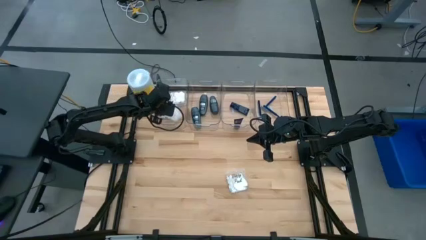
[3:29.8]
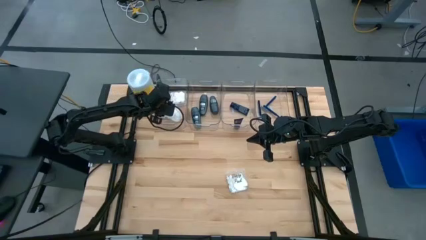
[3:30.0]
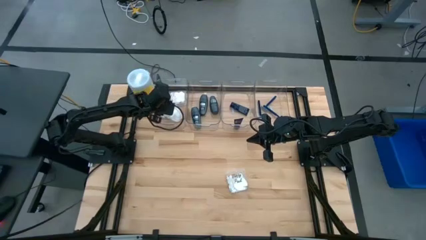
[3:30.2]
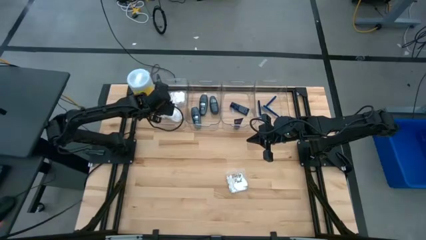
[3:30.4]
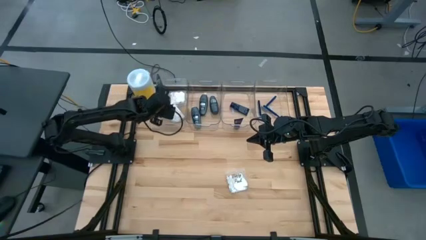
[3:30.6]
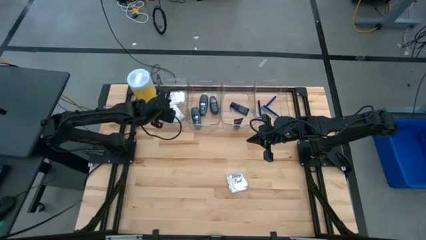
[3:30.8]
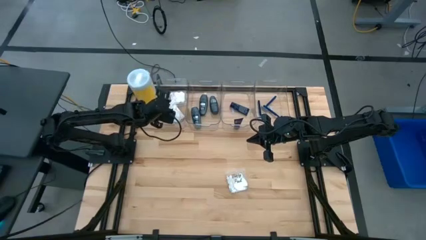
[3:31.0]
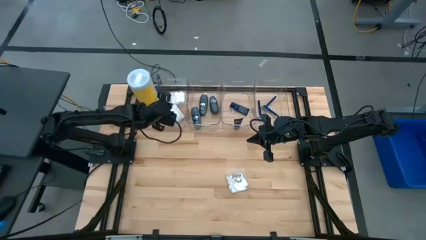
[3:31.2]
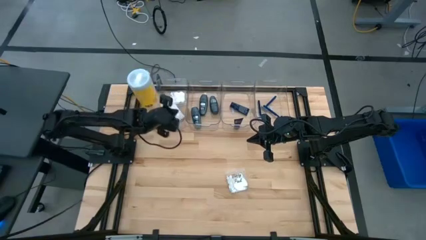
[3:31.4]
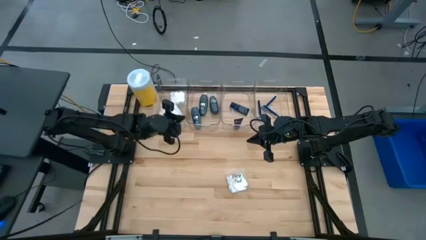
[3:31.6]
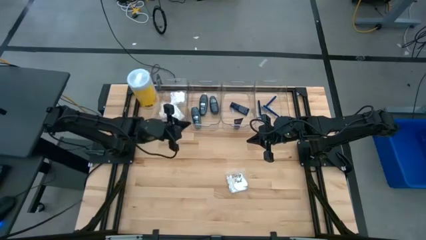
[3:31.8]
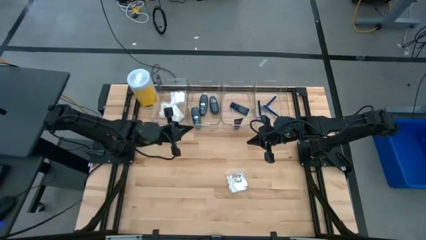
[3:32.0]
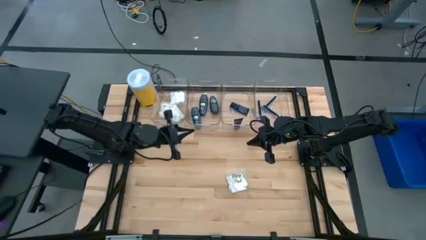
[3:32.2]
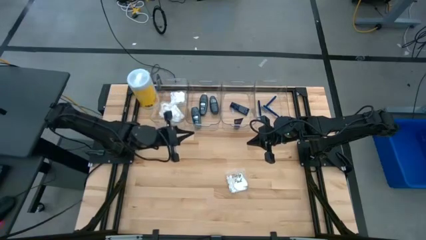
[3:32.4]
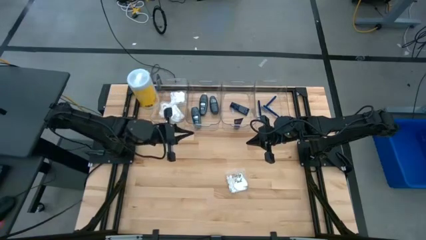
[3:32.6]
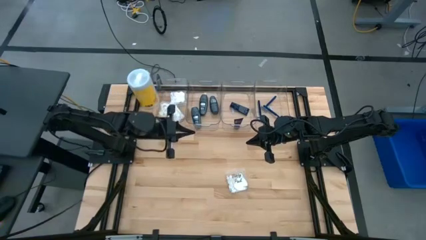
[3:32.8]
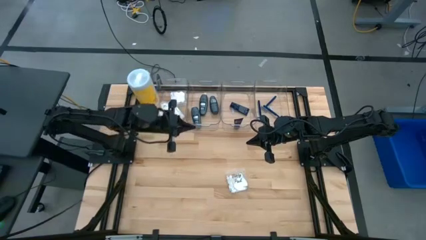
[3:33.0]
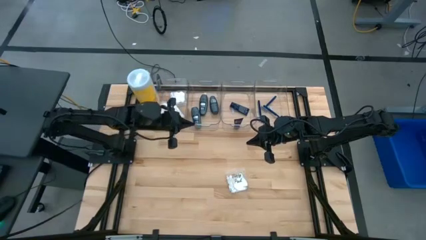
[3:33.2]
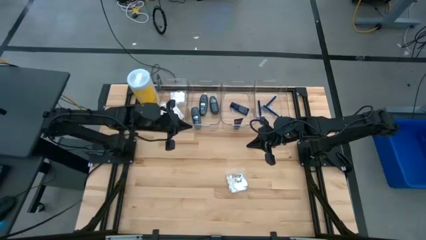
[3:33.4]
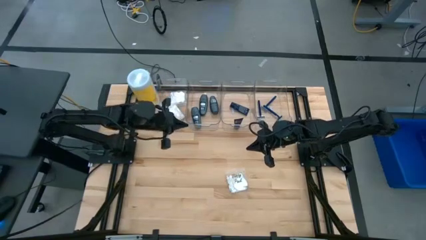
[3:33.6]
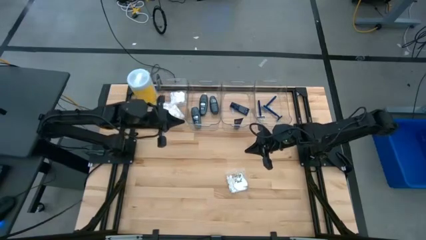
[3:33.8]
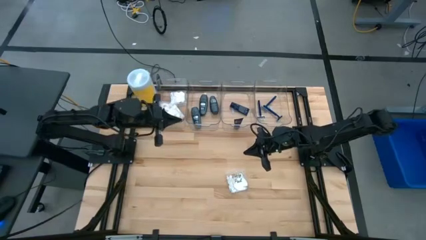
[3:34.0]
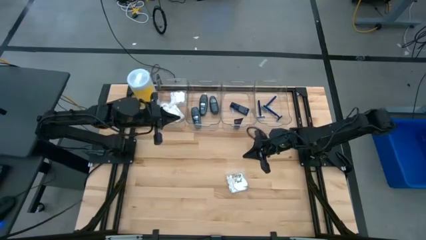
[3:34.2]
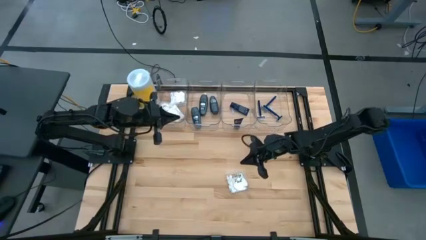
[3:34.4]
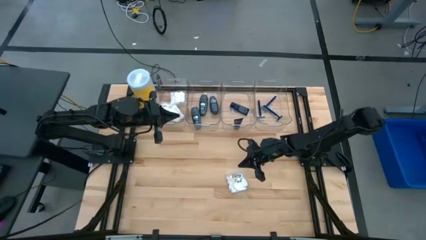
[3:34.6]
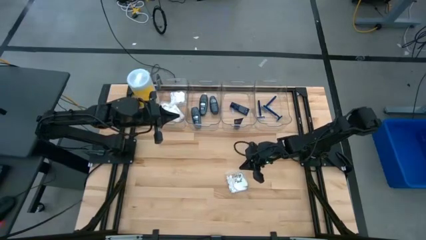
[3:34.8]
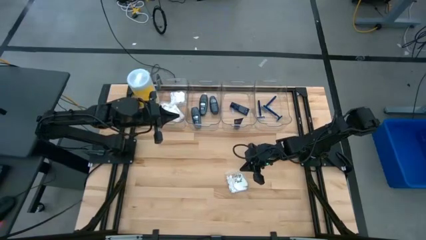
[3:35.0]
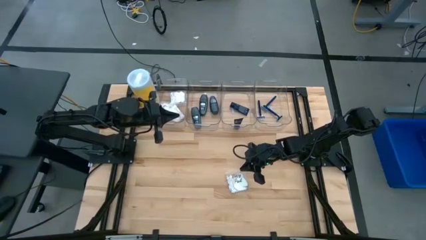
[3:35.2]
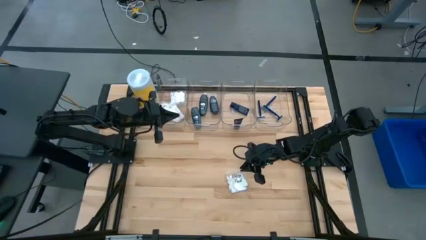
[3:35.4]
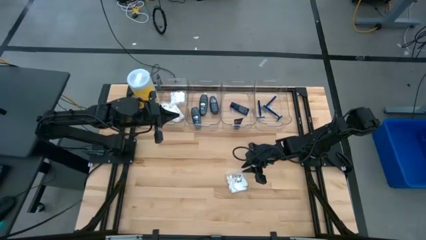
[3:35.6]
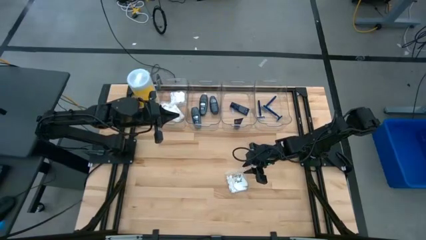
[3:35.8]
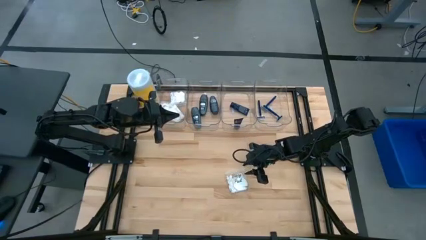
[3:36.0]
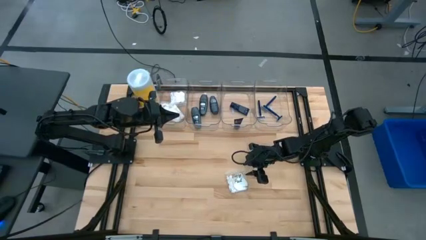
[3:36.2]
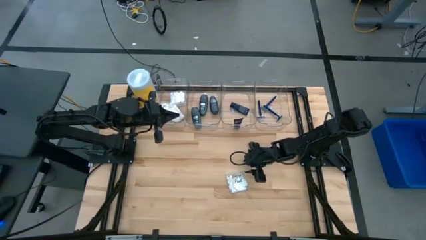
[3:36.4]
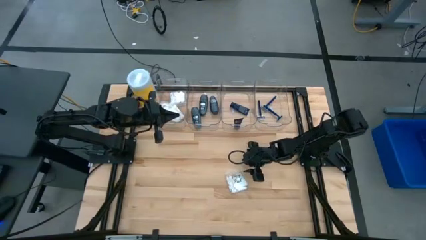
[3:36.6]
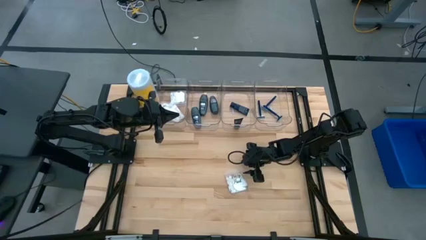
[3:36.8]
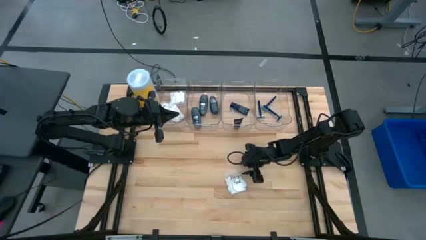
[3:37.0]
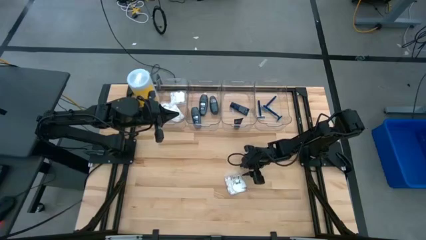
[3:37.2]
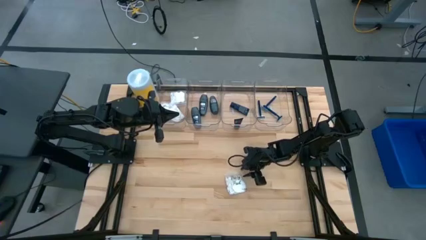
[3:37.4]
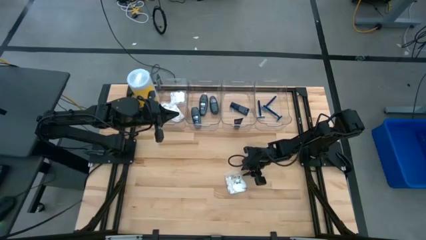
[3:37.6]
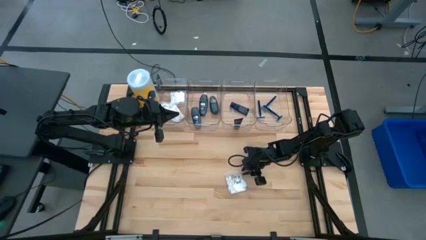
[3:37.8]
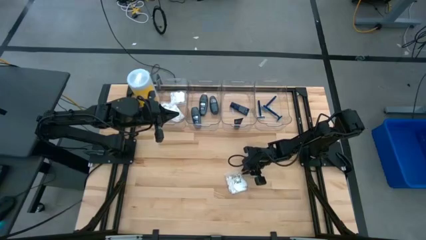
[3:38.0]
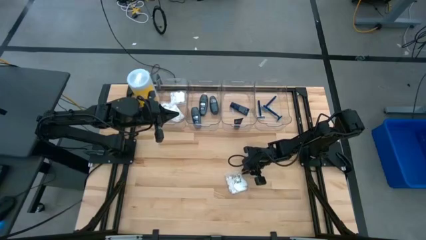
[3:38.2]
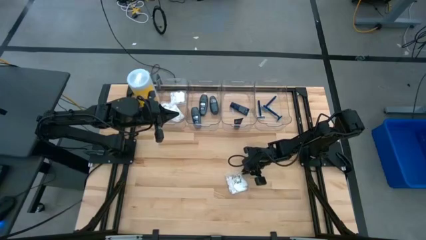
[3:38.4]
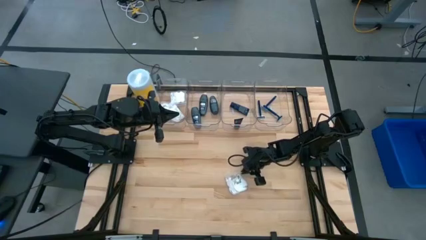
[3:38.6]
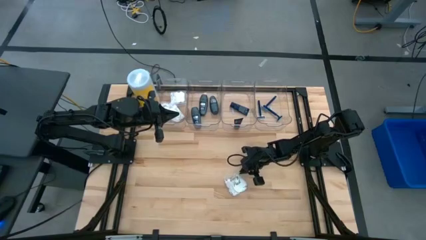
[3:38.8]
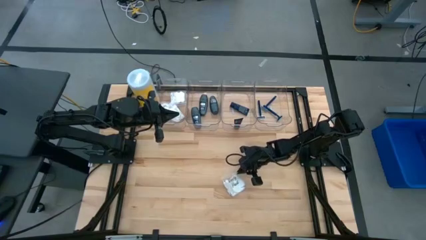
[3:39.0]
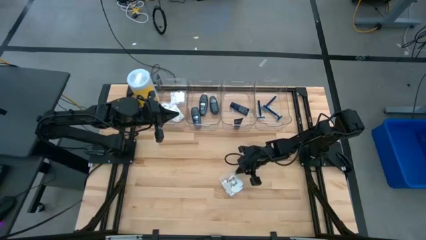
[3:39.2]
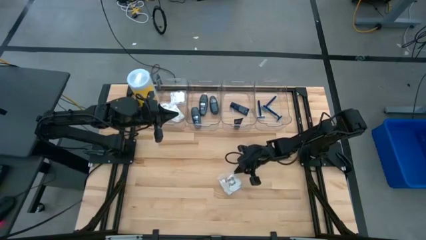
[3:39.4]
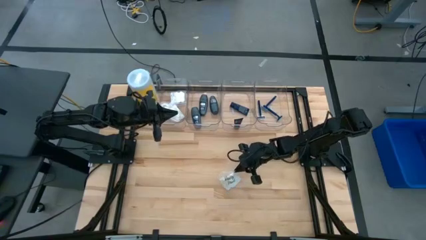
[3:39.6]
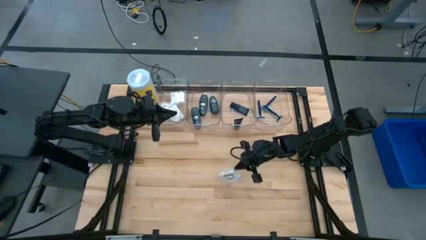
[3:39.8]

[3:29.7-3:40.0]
Task: Pick & Place Travel size toiletries
Put the white cotton pack into the left transparent bin

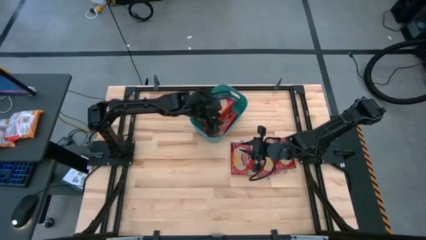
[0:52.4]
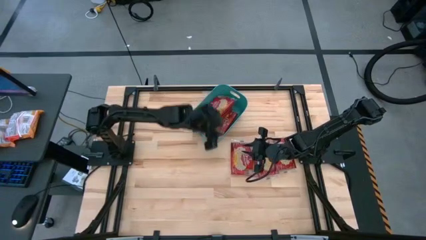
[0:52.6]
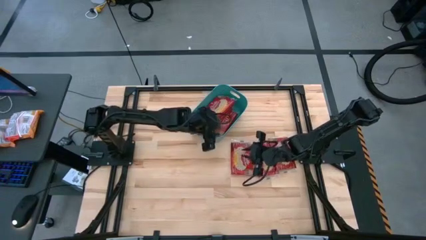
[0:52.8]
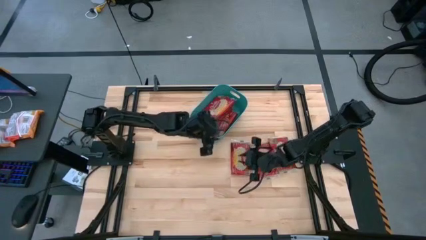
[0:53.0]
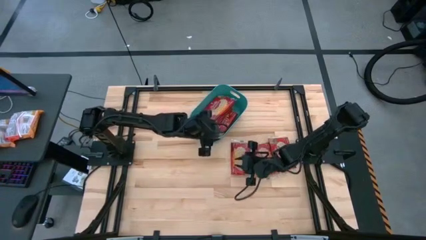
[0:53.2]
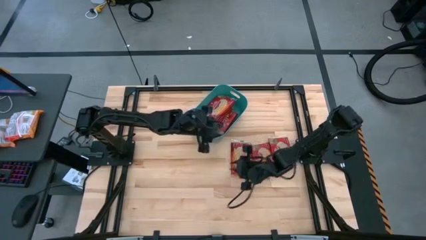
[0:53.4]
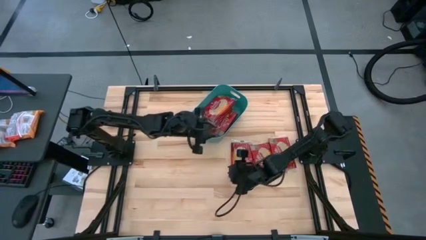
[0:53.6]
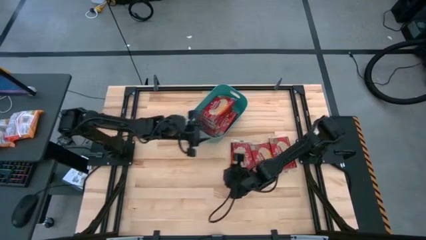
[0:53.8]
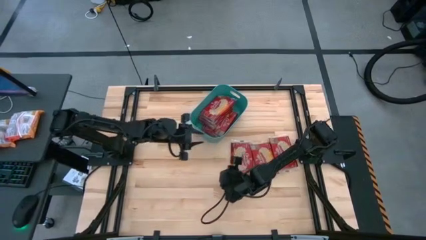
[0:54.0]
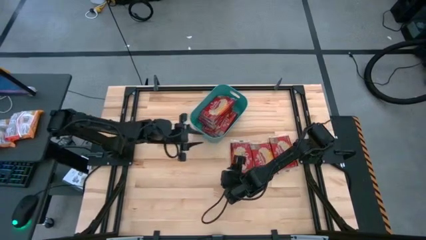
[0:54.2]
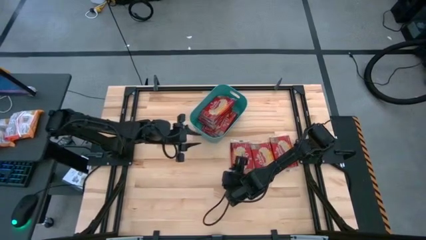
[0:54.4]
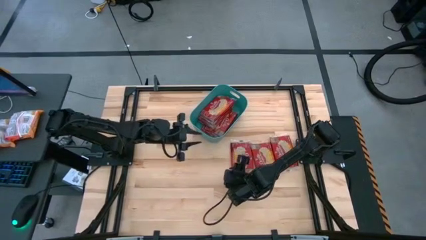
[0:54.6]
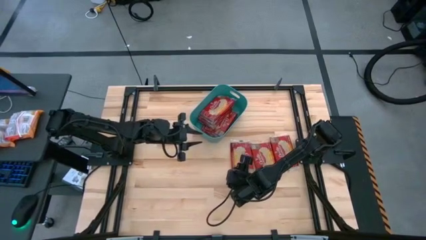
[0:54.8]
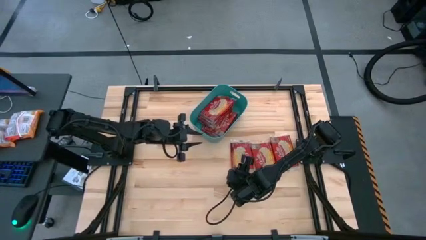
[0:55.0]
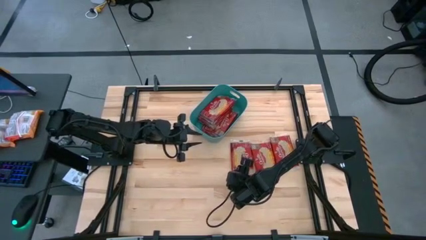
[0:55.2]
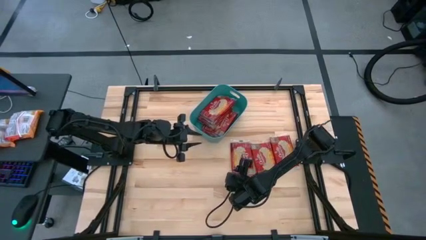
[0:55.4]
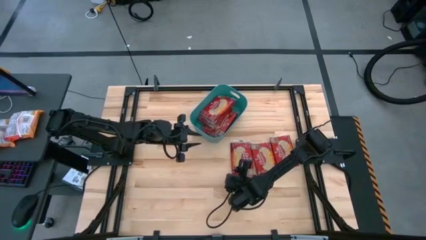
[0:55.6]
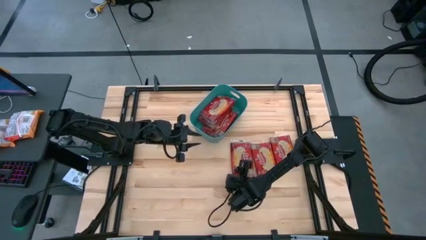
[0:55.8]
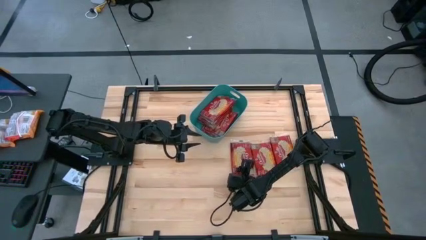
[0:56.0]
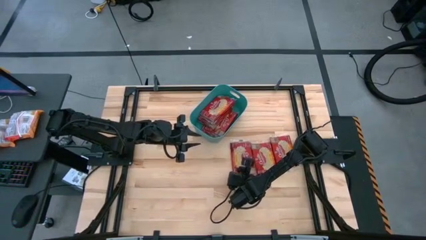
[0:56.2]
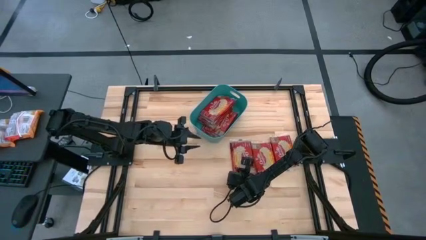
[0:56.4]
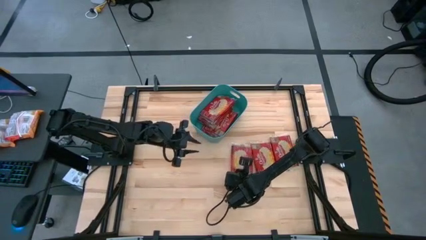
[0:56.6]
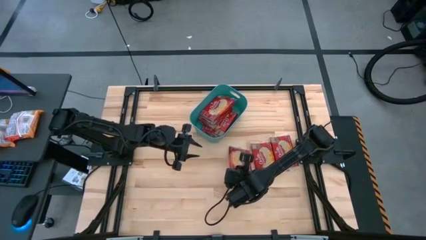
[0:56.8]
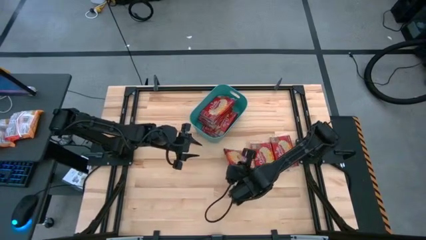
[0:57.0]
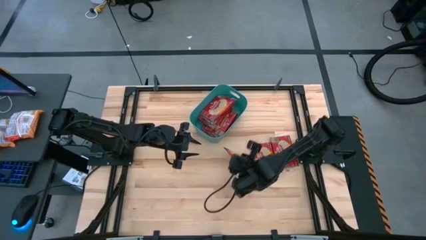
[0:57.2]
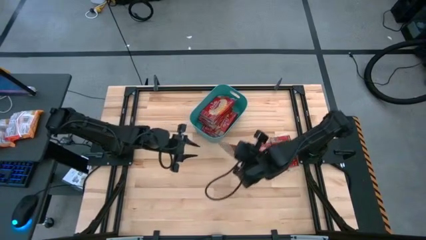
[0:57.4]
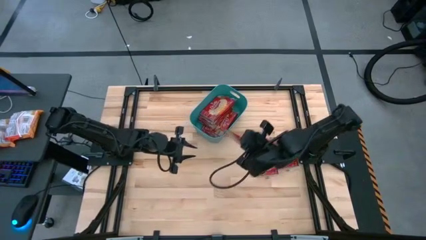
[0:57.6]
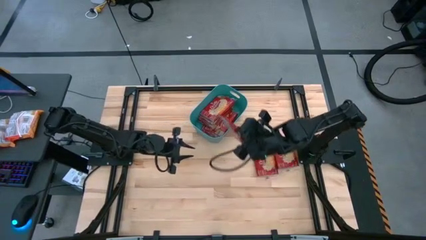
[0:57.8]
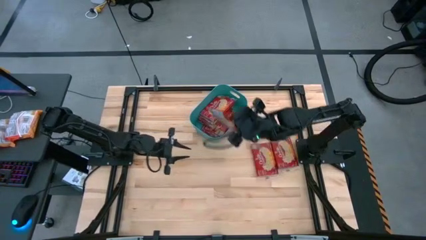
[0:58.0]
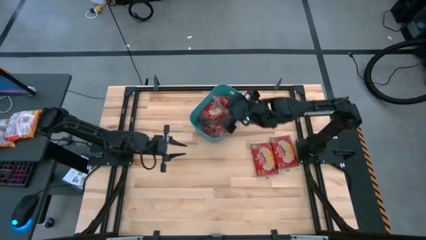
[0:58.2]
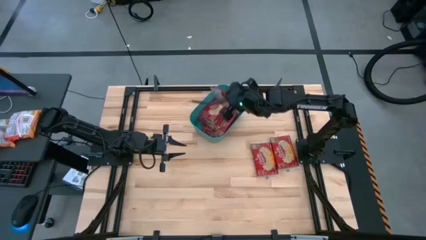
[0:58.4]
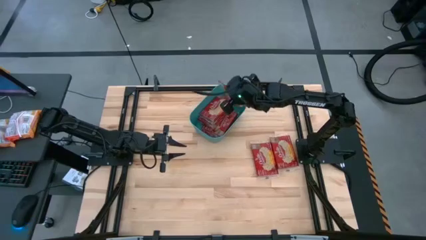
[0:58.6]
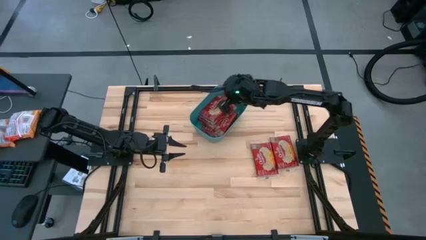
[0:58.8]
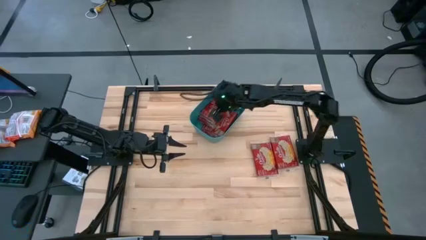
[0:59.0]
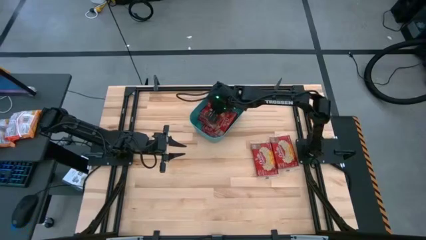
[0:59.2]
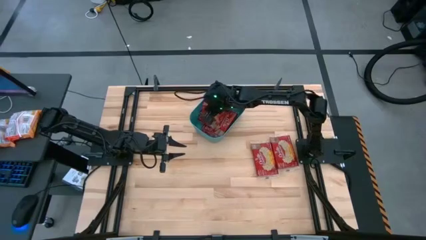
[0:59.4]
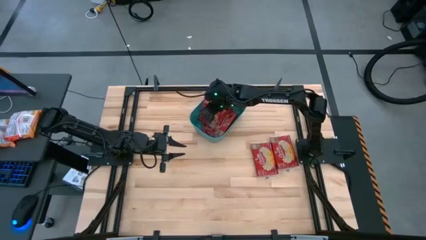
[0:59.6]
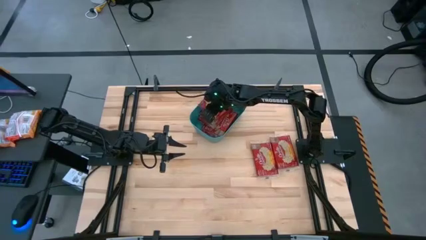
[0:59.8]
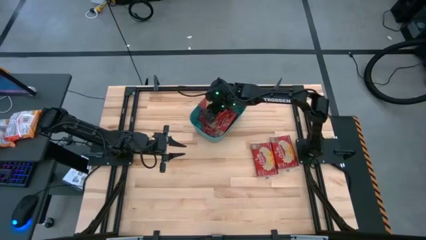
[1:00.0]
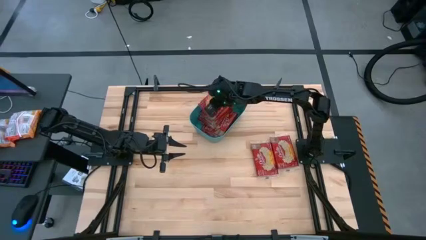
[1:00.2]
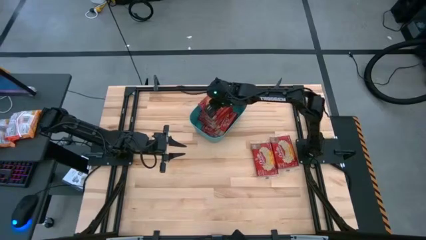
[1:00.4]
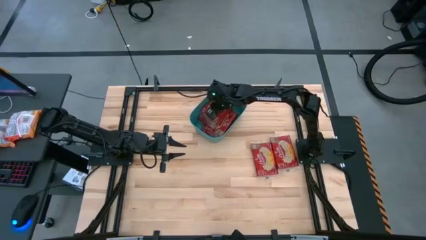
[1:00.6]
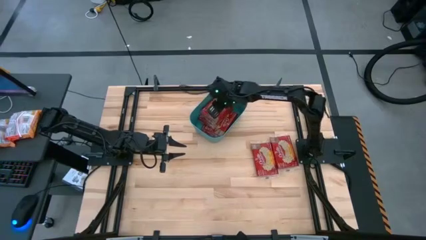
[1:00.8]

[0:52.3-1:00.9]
Task: Sort popcorn bags into baskets
Put the popcorn pack into the blue bin
